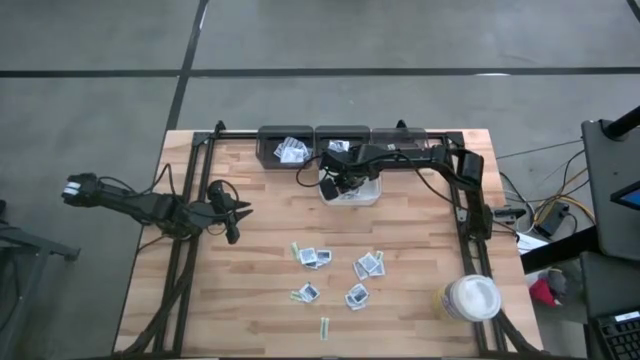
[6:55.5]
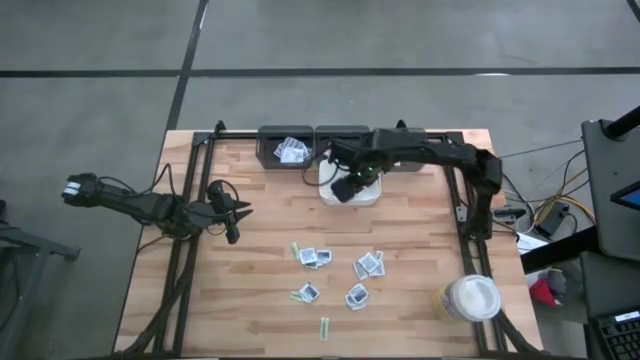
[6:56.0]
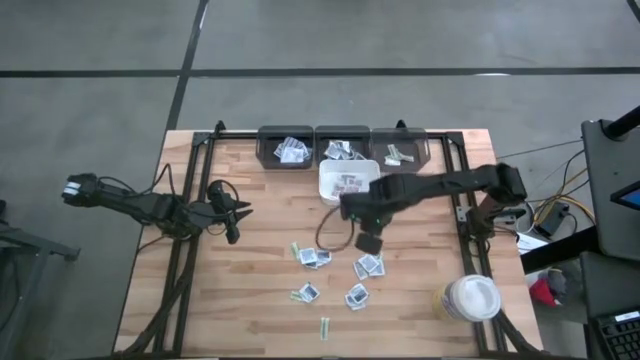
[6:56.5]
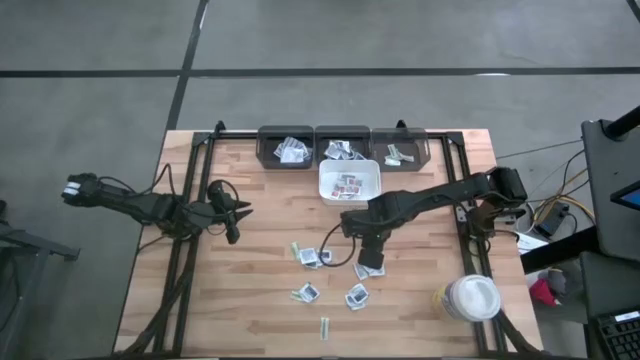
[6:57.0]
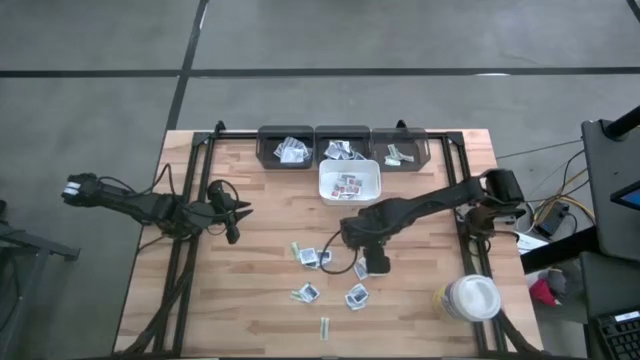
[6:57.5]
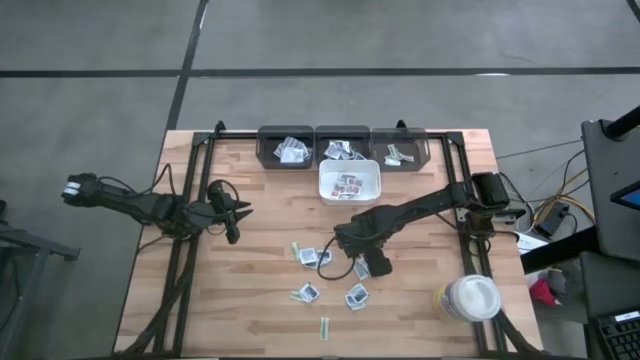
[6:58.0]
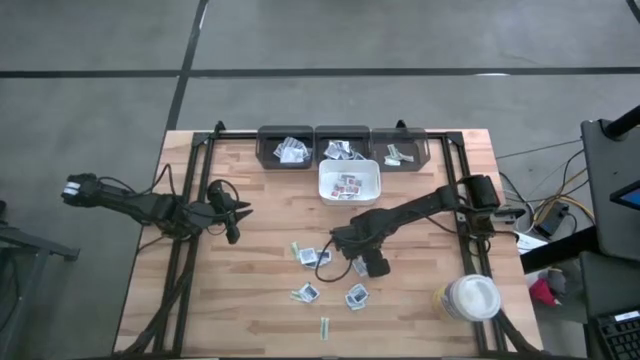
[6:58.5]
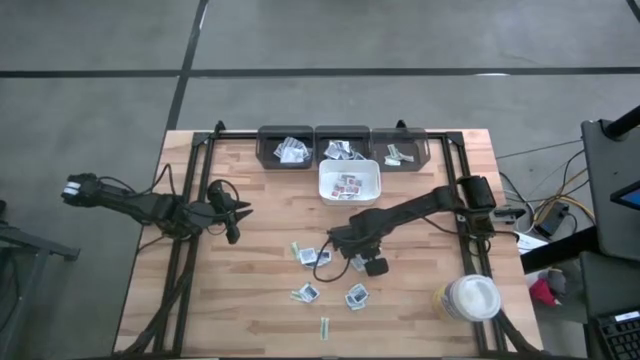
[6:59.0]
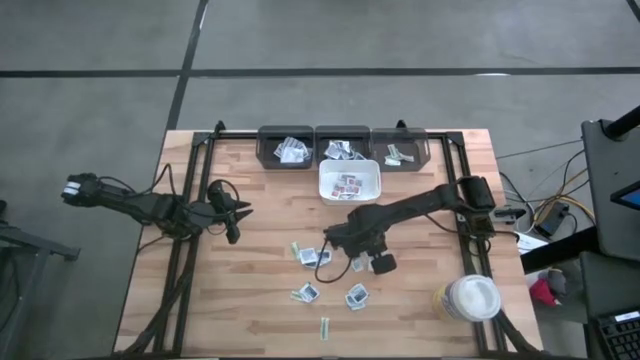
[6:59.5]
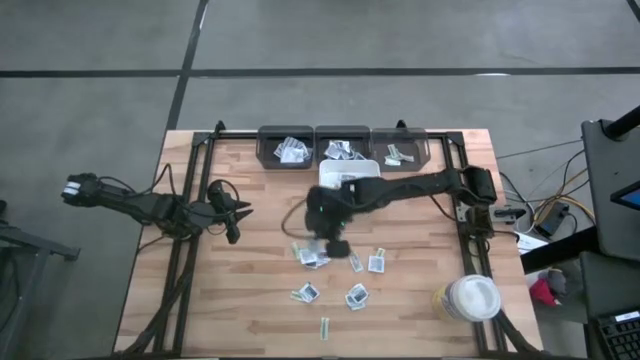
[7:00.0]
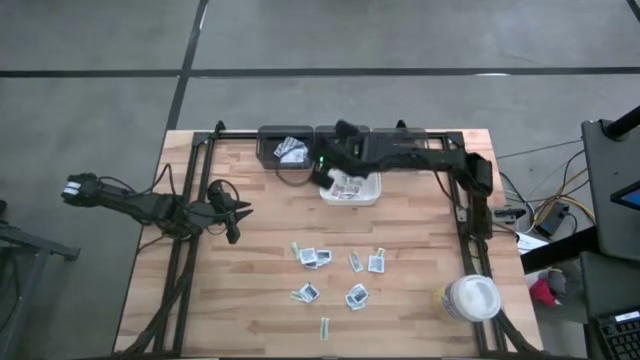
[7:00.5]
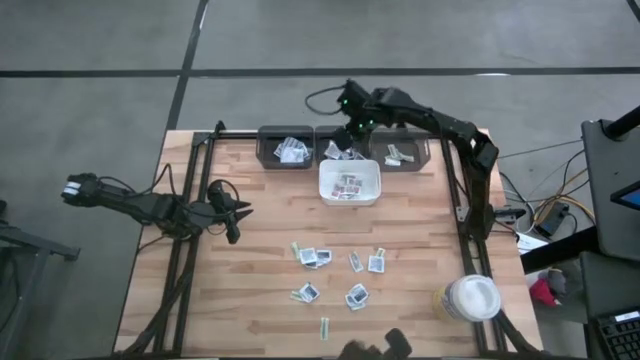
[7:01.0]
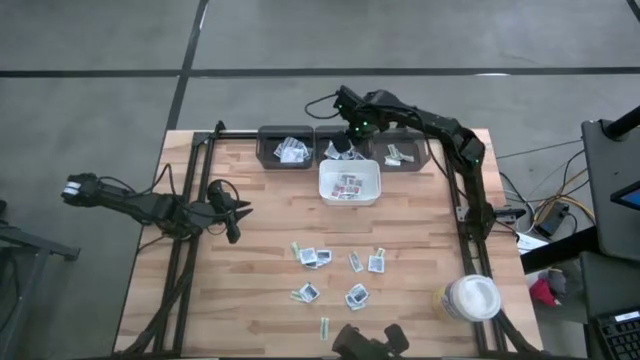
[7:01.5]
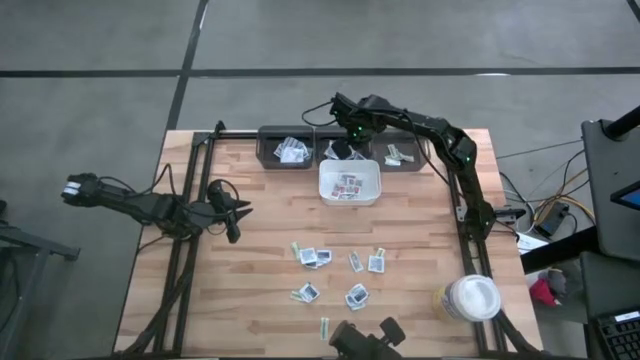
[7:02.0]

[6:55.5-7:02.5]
Task: Pick & Place First Aid Supplies
Put the blue alcohol pad into the middle gray bin

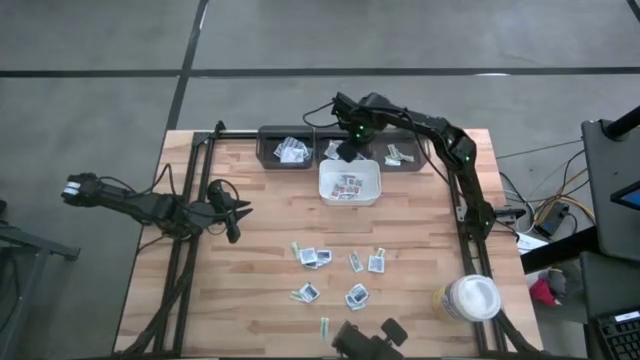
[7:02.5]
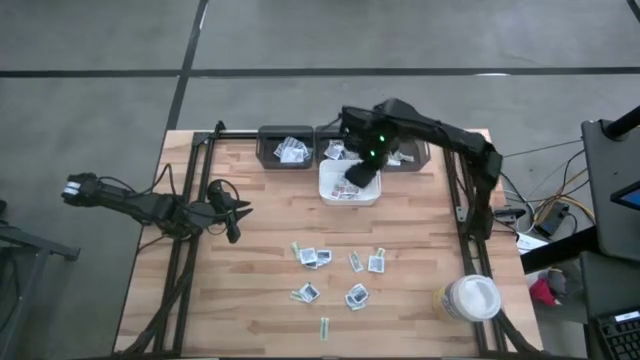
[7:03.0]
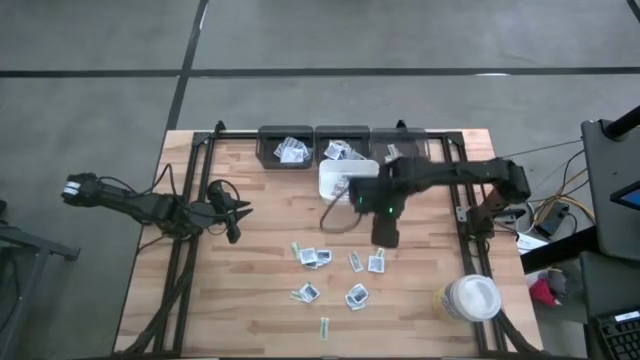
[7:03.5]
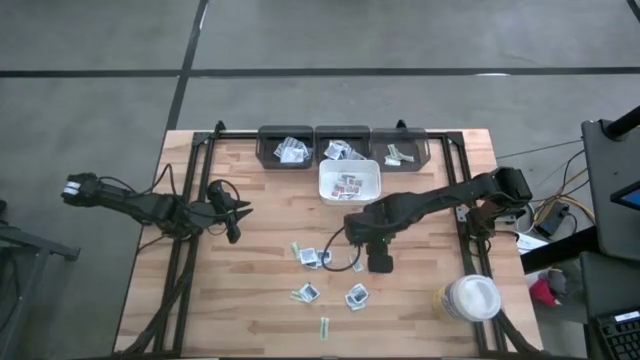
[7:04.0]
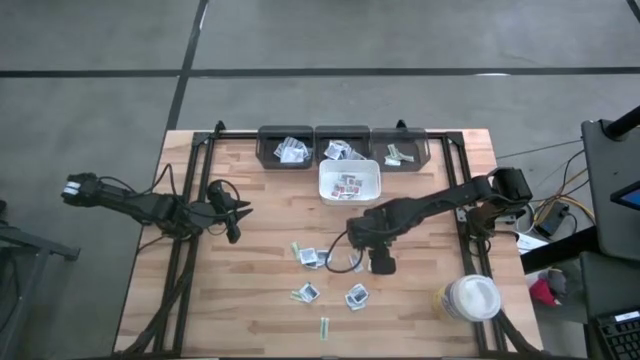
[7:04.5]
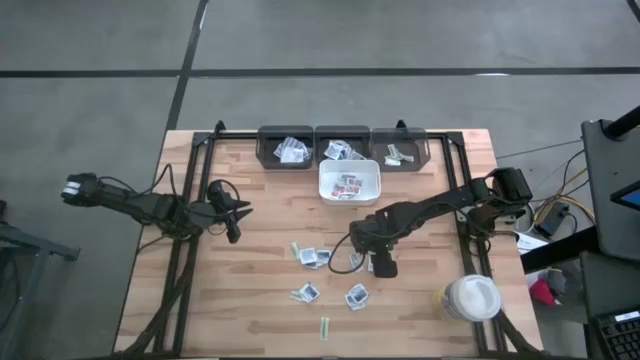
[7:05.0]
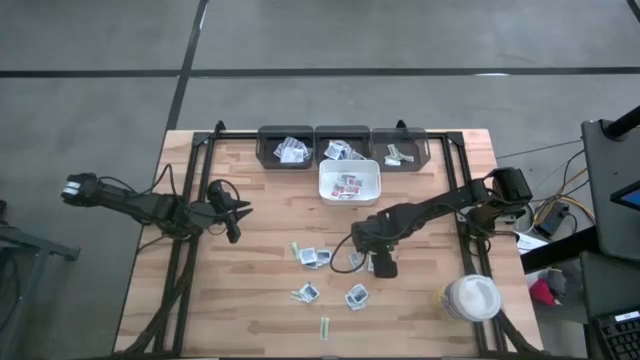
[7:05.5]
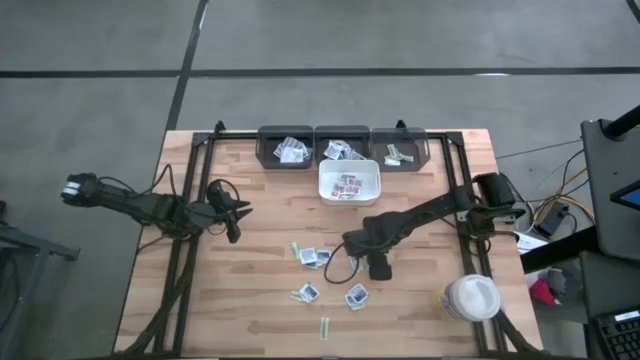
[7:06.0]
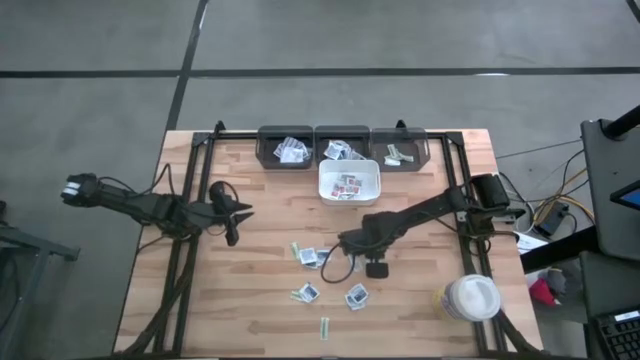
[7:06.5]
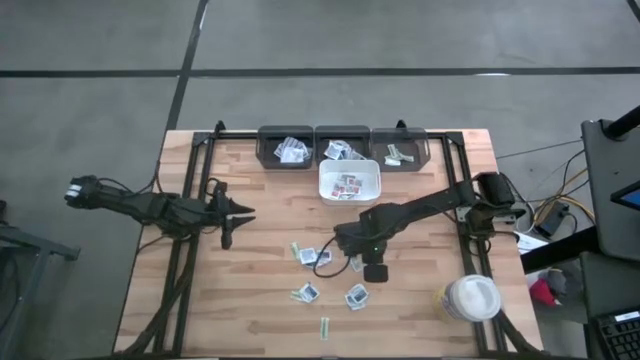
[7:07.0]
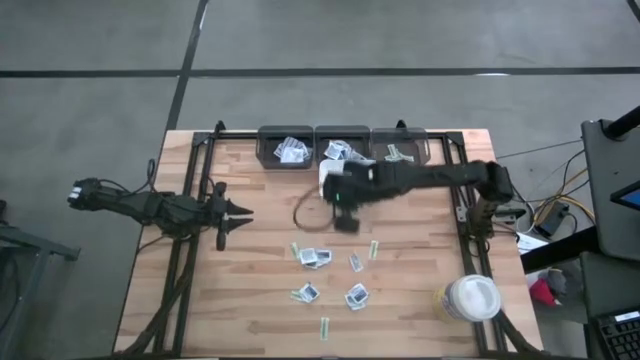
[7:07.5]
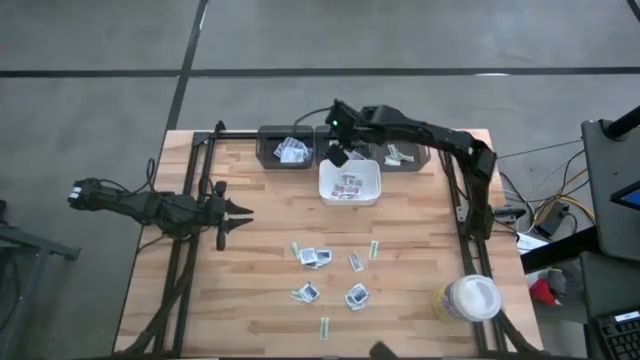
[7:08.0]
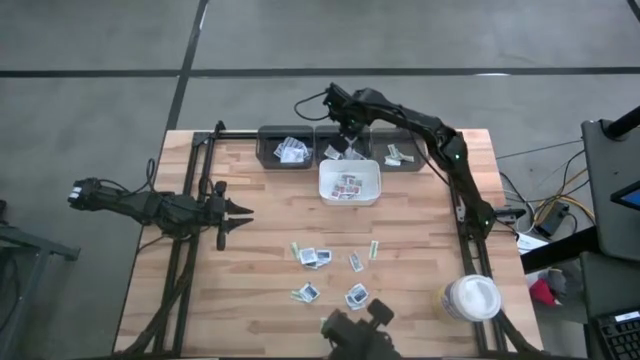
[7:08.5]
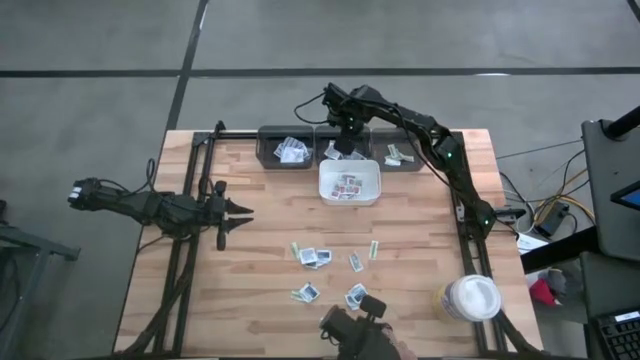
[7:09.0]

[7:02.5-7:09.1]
Put the blue alcohol pad into the middle gray bin

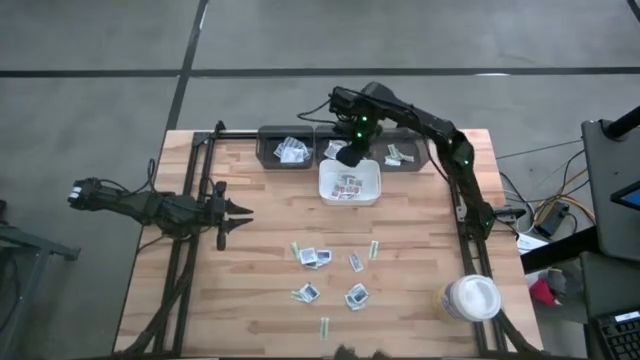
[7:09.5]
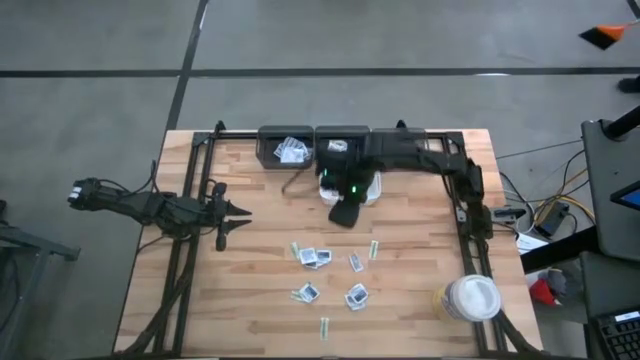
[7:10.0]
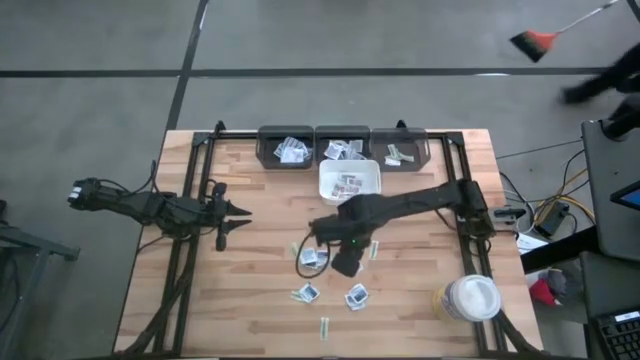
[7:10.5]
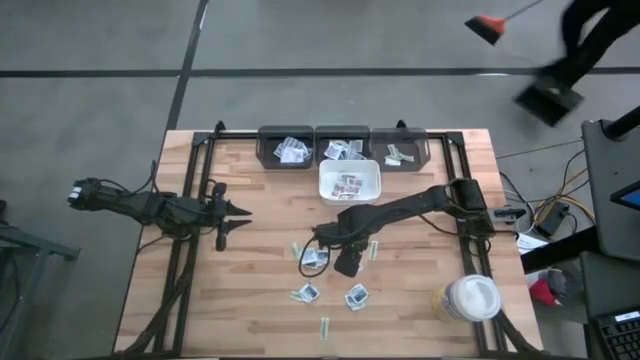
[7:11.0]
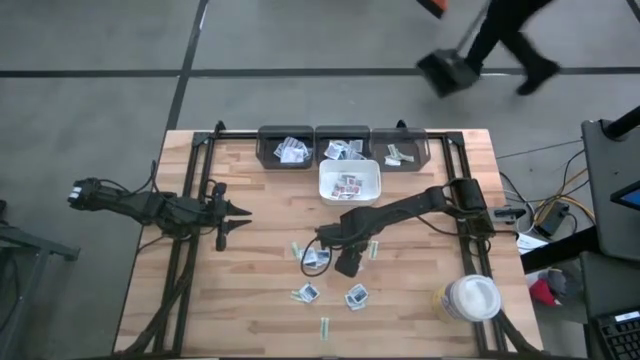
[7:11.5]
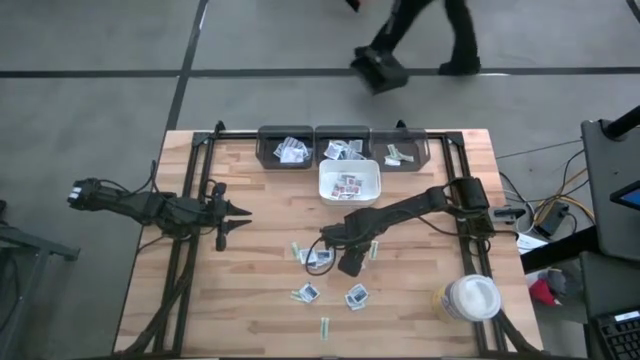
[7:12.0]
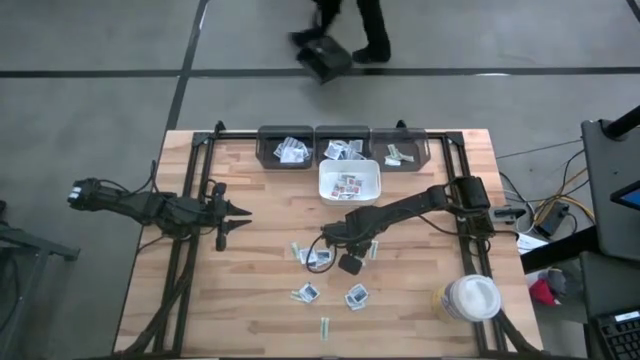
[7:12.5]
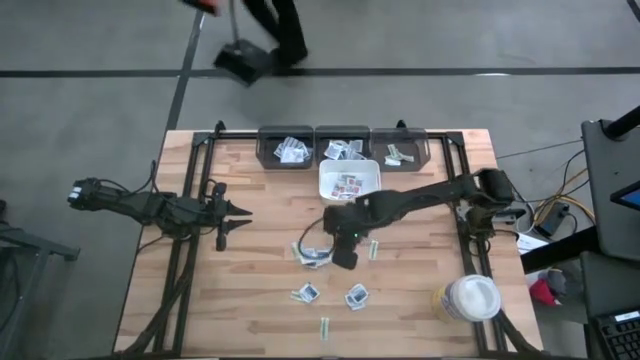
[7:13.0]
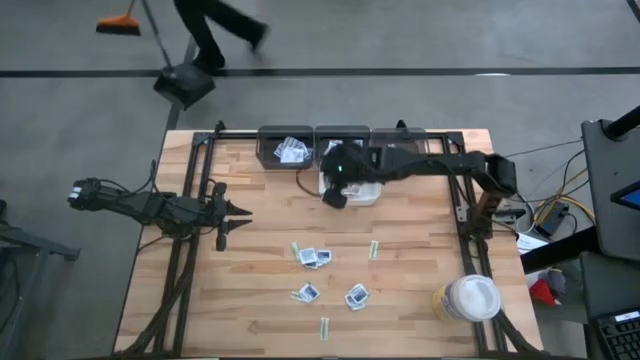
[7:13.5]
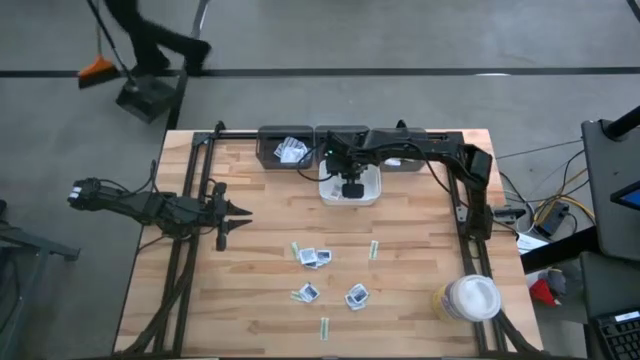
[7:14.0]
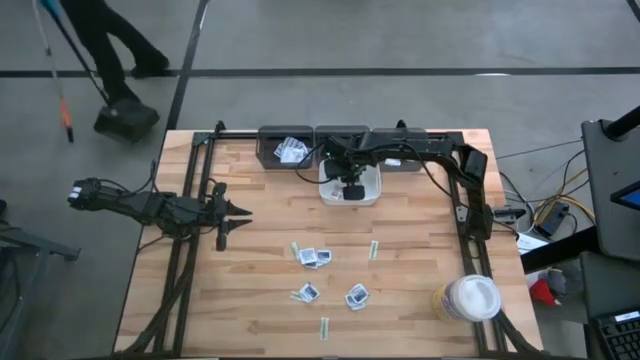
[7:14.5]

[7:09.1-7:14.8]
Put the orange ointment pack into the white bin

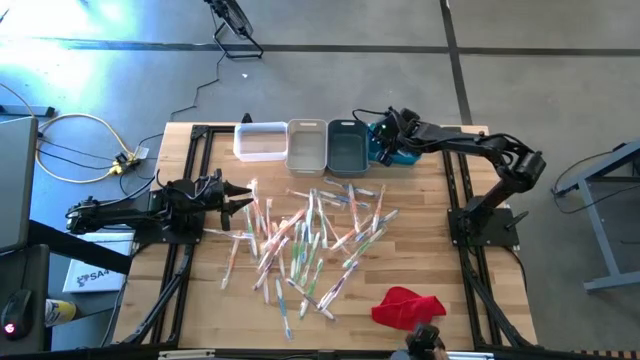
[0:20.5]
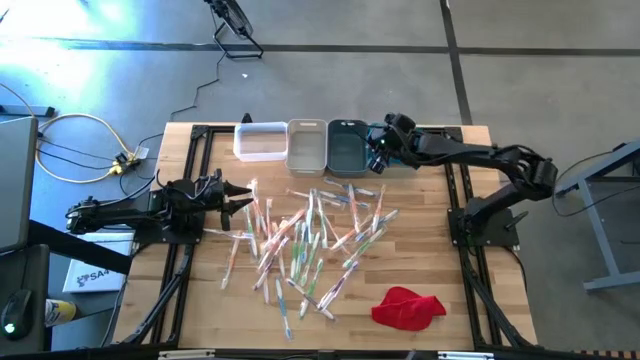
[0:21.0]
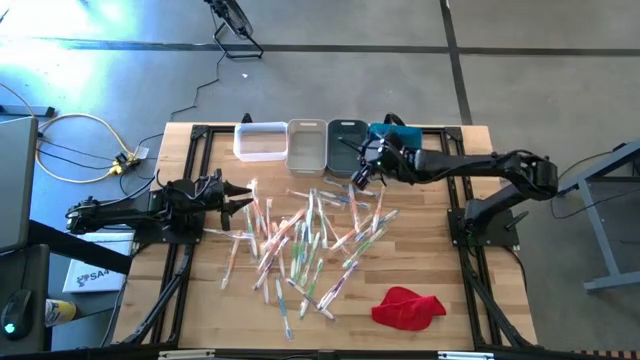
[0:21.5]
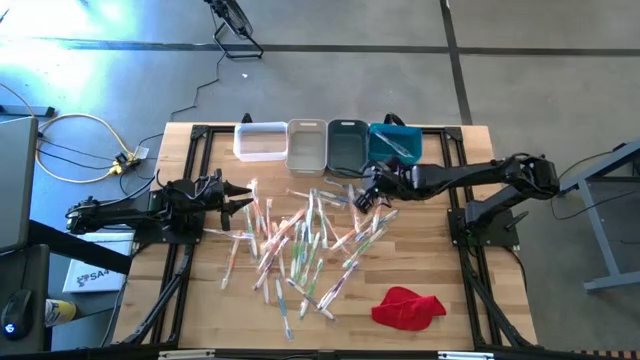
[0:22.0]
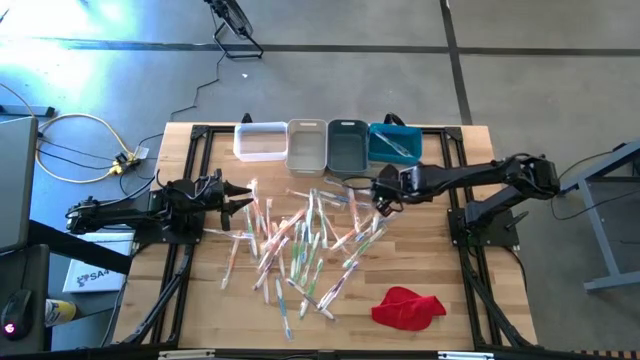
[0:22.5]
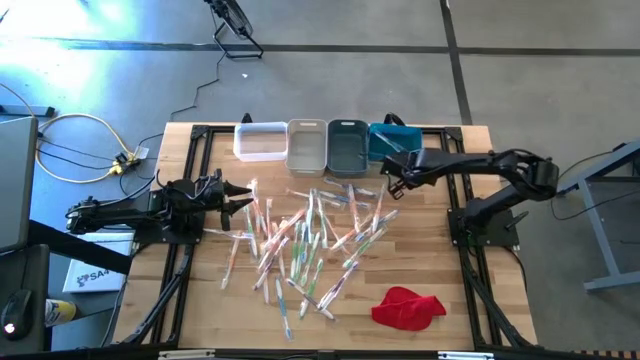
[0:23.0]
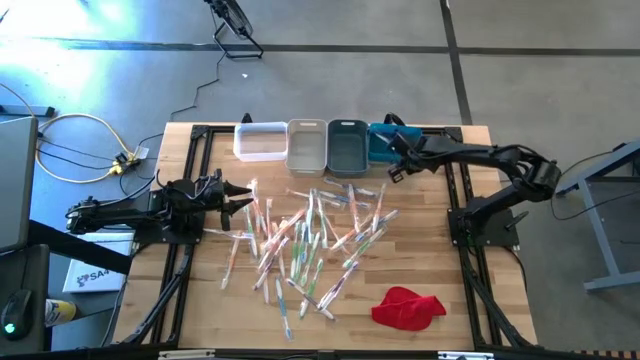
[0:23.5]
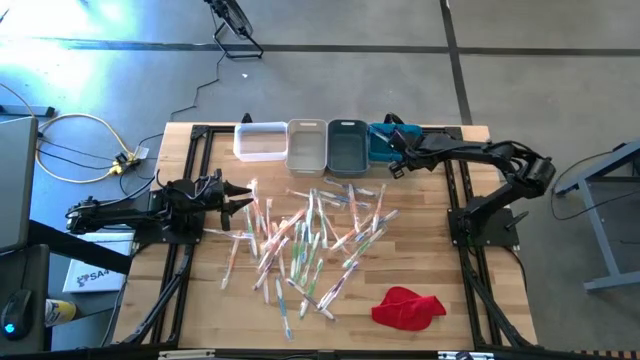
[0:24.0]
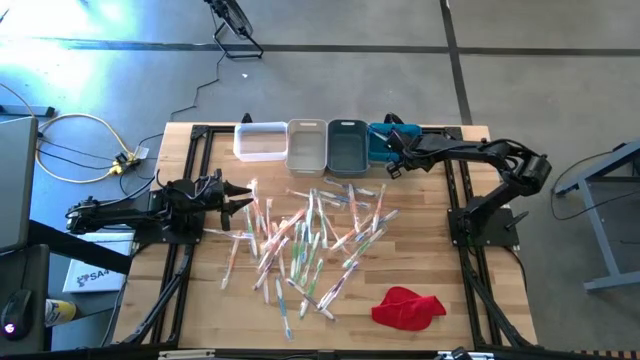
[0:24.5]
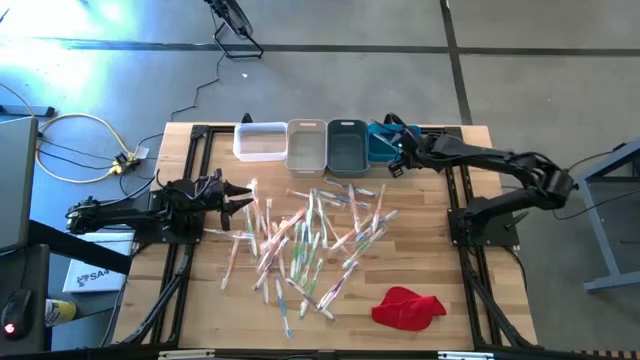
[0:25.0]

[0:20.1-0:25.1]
Task: Pick & Place Toothbrushes
Adjust the blue bin on the table
